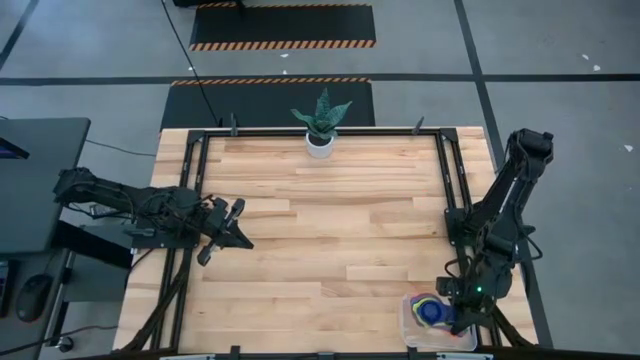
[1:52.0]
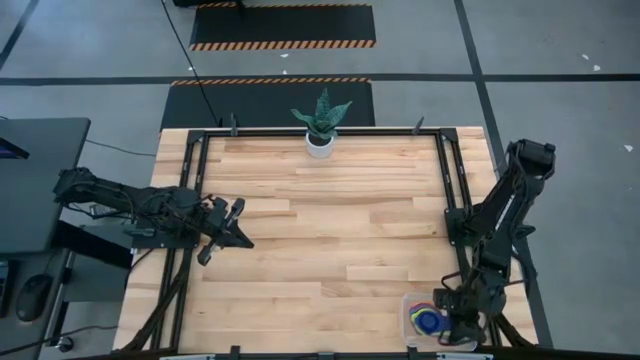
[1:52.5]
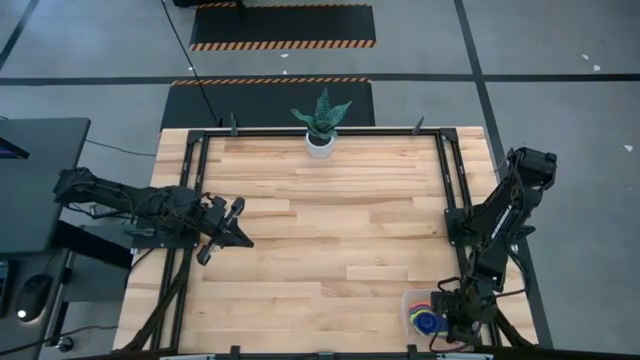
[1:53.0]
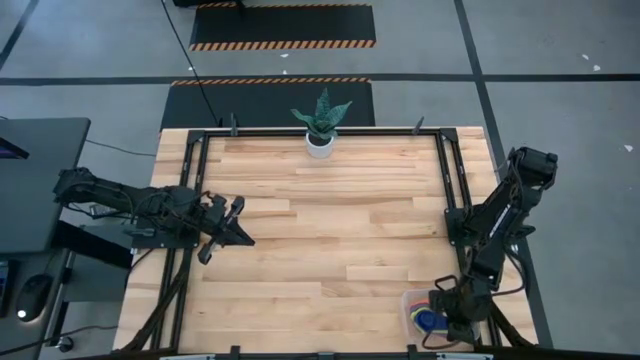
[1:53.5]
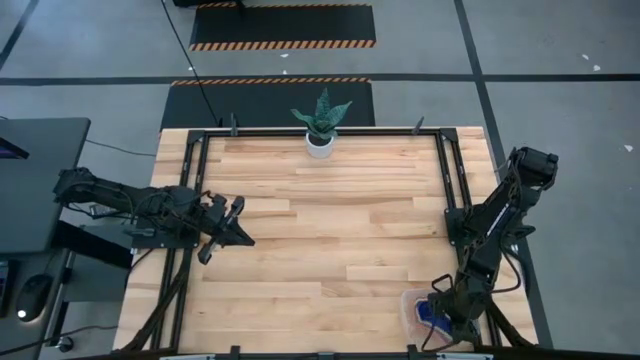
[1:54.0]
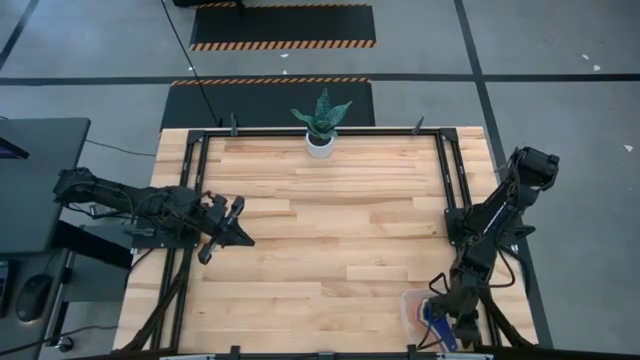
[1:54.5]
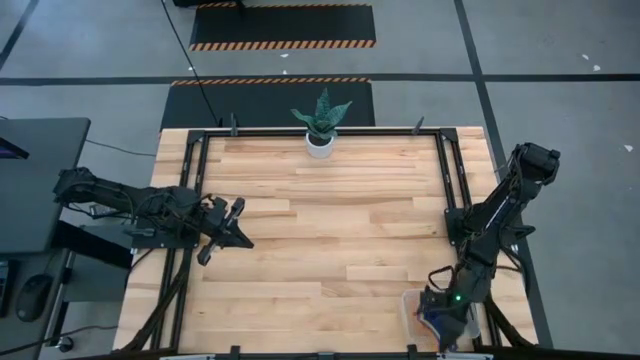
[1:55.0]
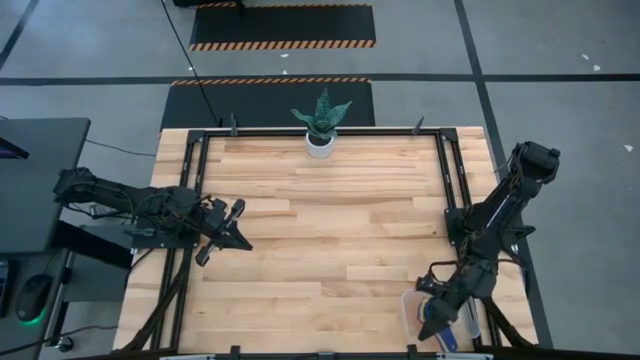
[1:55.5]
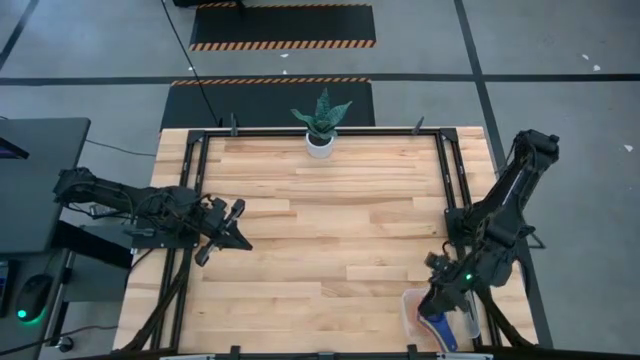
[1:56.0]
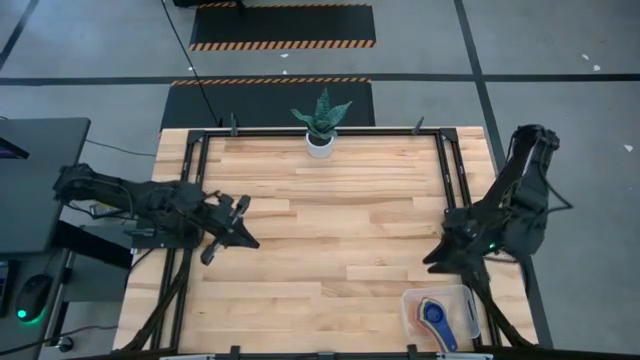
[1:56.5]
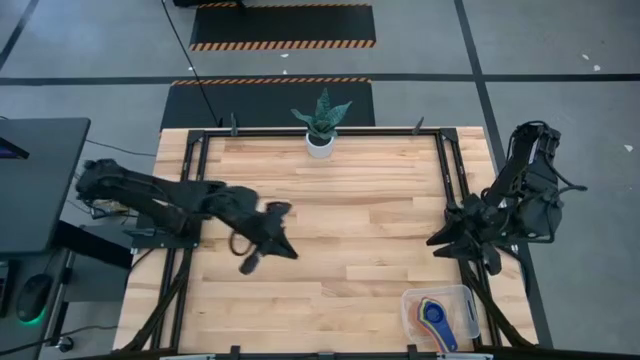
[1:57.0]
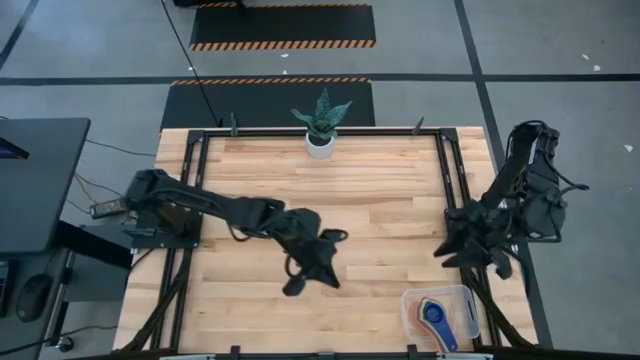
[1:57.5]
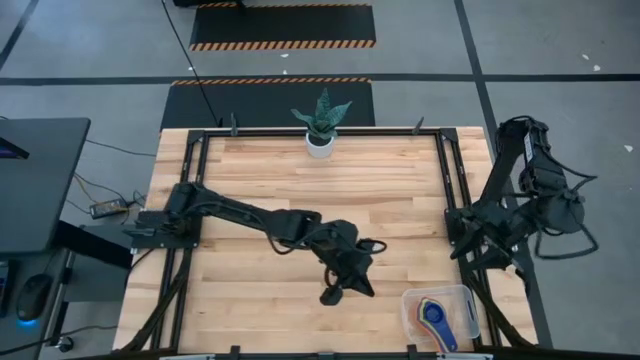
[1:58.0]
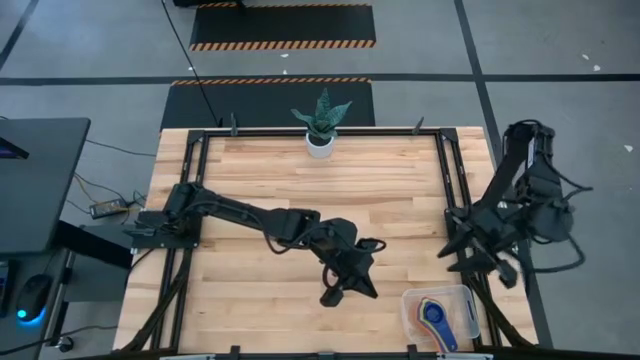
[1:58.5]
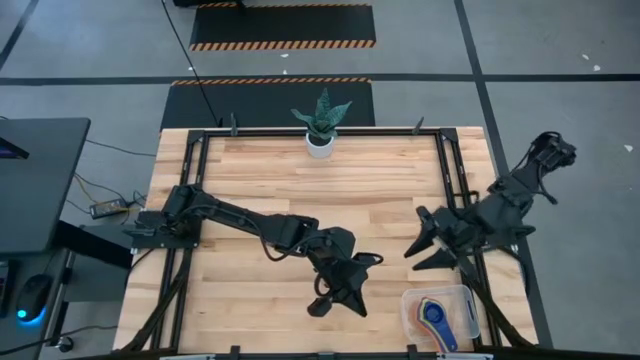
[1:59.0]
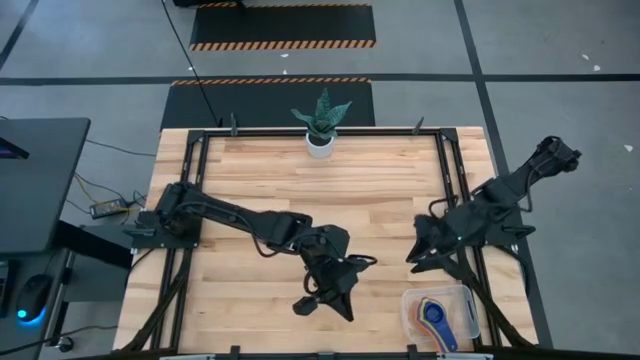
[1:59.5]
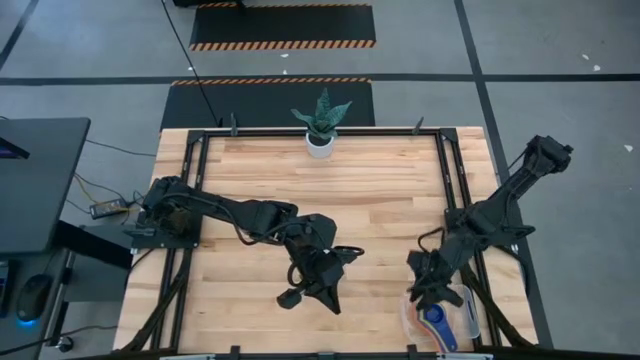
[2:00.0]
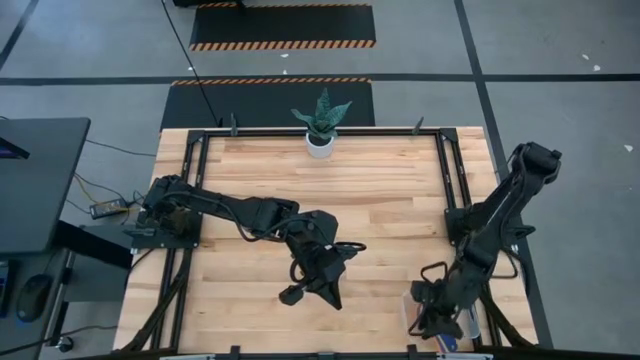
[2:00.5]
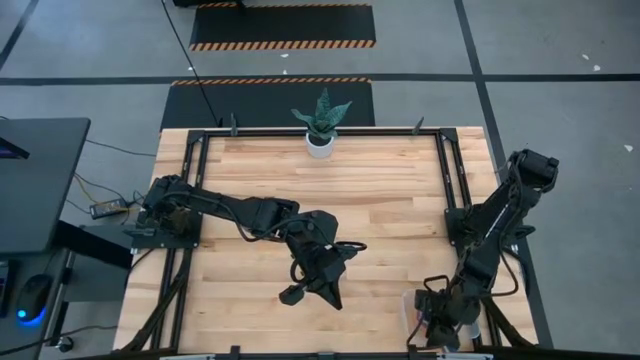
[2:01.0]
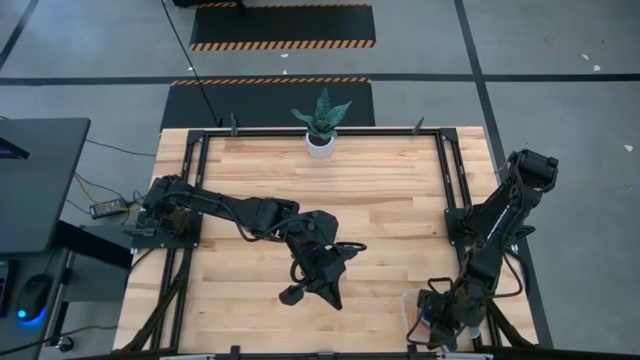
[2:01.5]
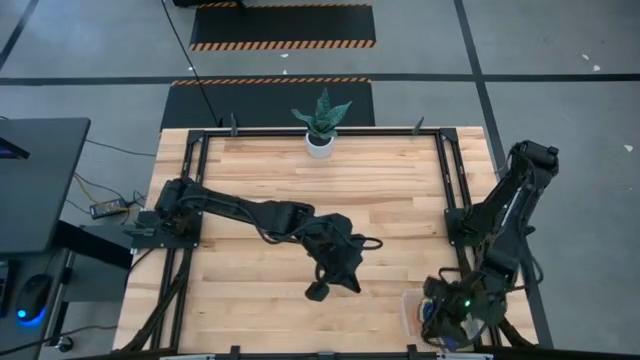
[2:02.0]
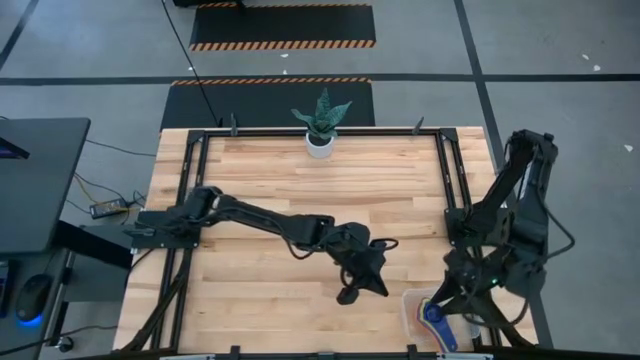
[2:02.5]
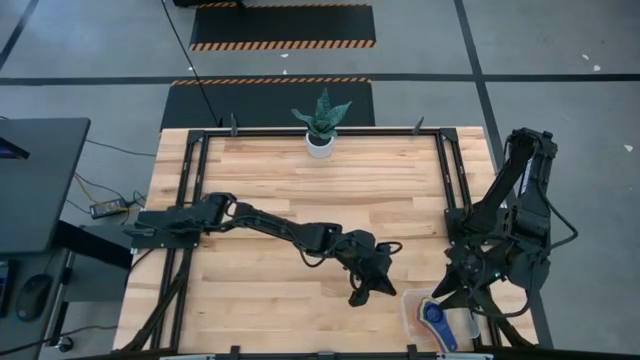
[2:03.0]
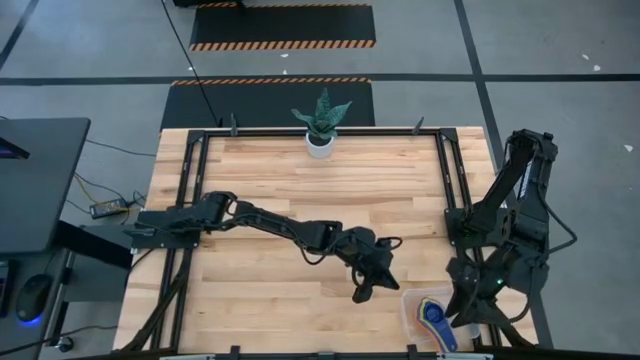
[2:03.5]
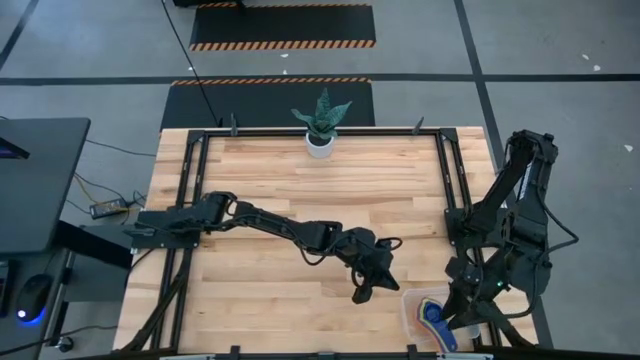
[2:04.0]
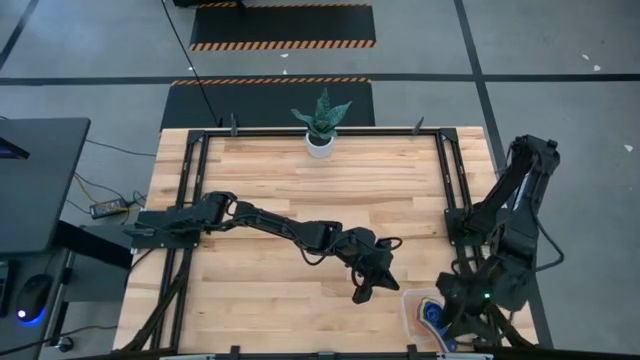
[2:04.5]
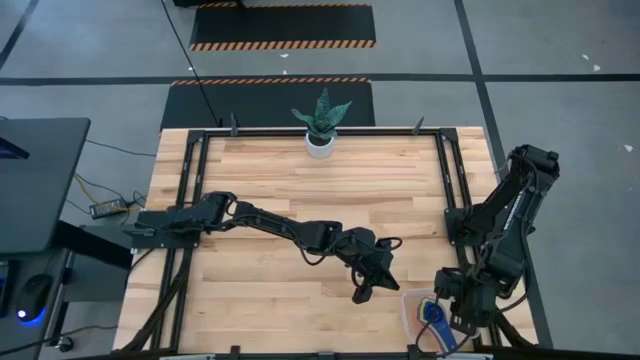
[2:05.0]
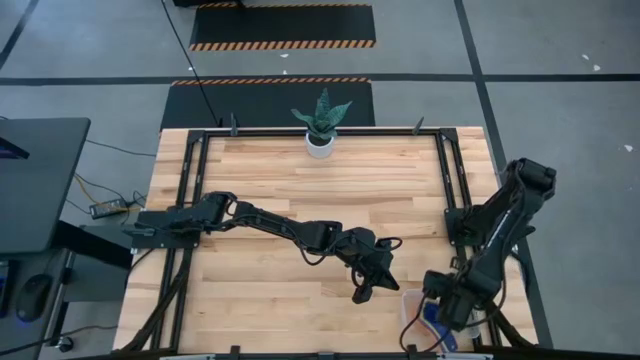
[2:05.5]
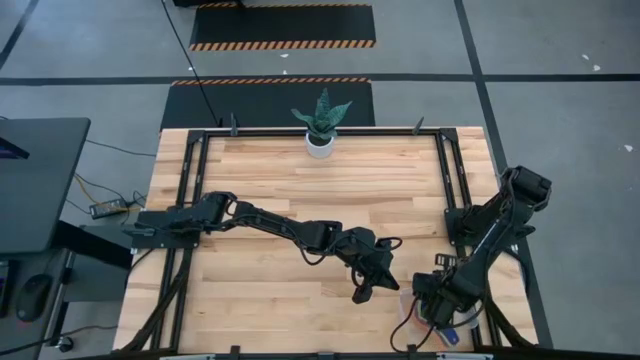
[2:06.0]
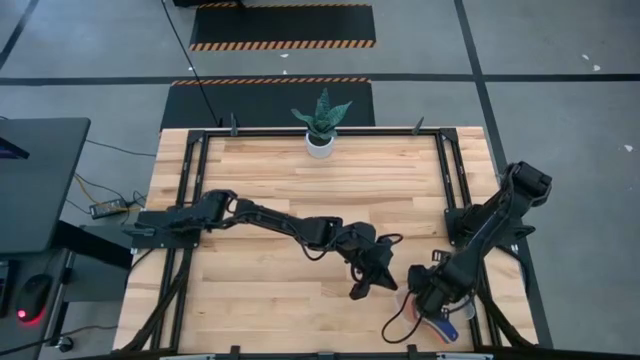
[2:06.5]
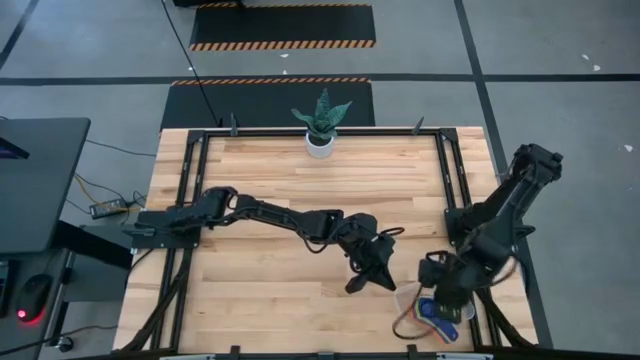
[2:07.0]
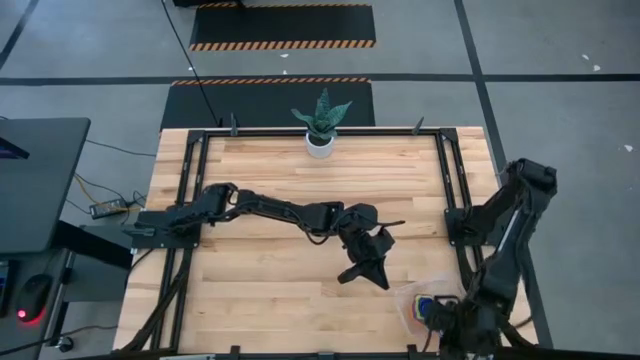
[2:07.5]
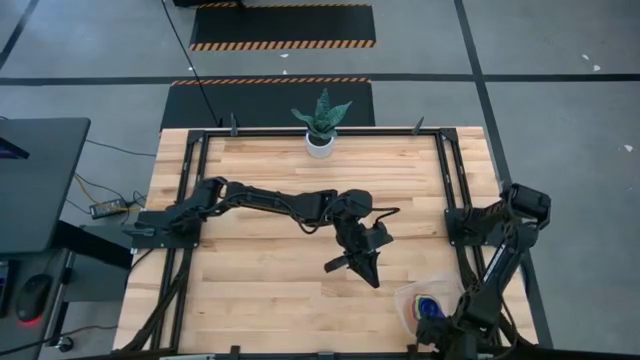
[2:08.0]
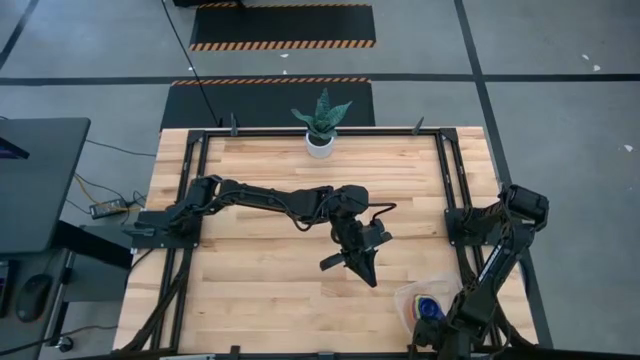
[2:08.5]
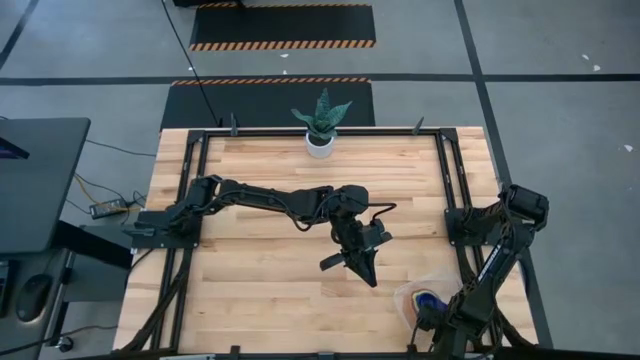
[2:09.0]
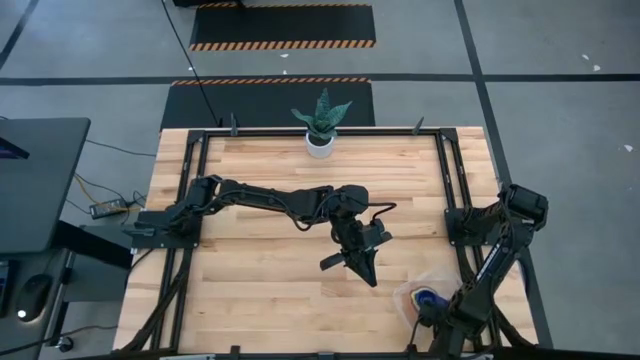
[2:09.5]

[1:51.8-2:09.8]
Task: Nest measuring cups in basket
Put the nested measuring cups into the transparent bin

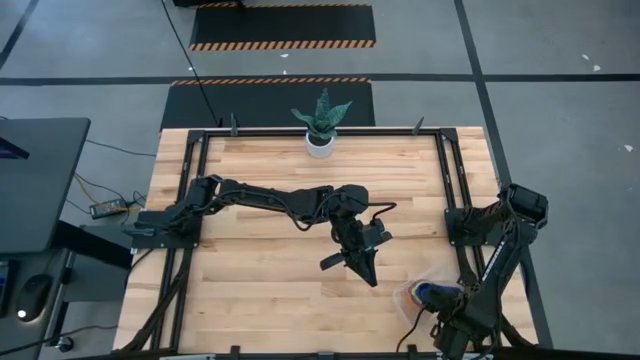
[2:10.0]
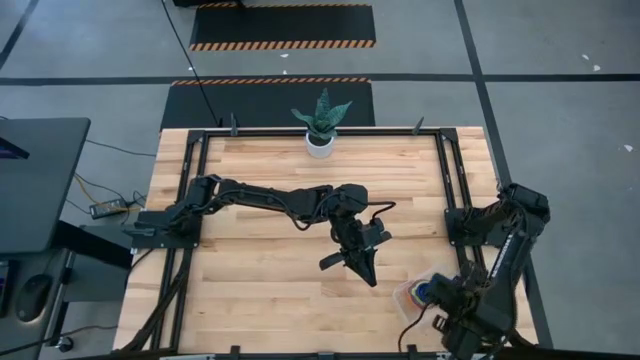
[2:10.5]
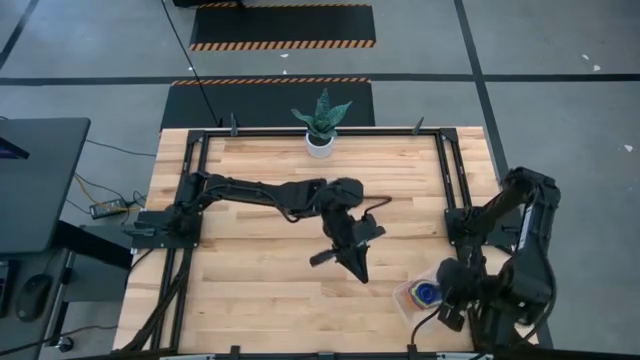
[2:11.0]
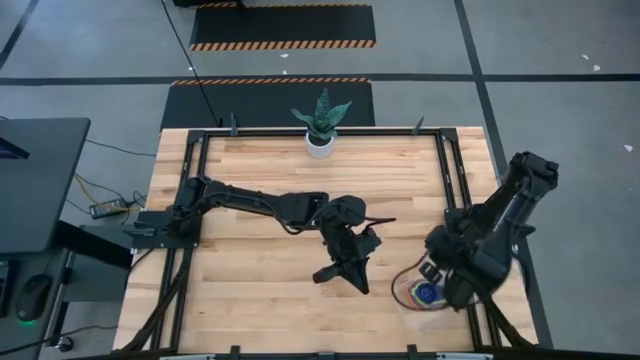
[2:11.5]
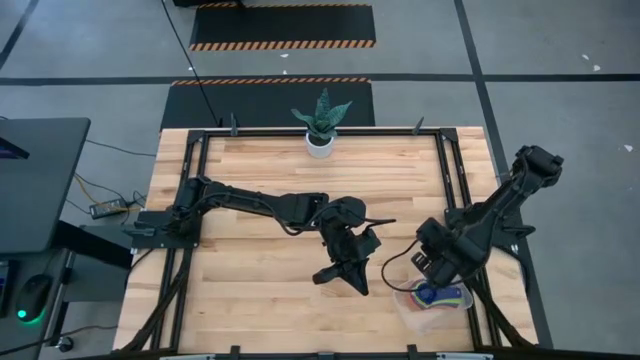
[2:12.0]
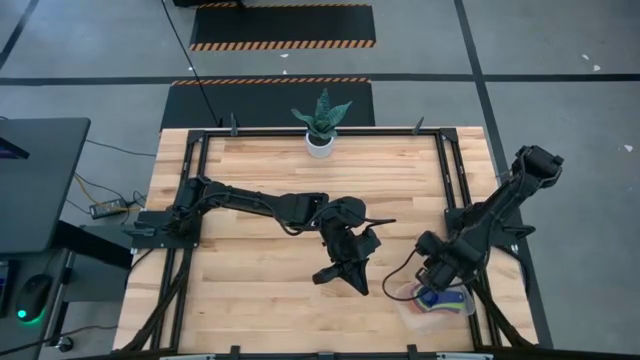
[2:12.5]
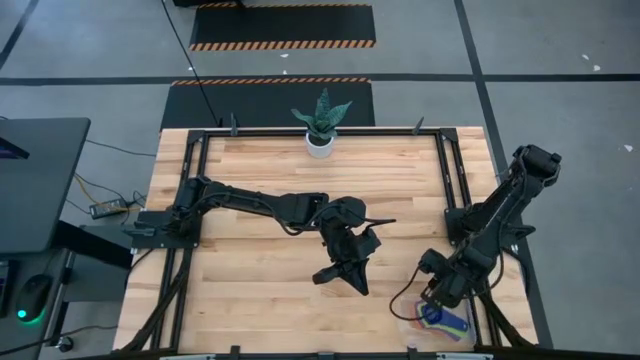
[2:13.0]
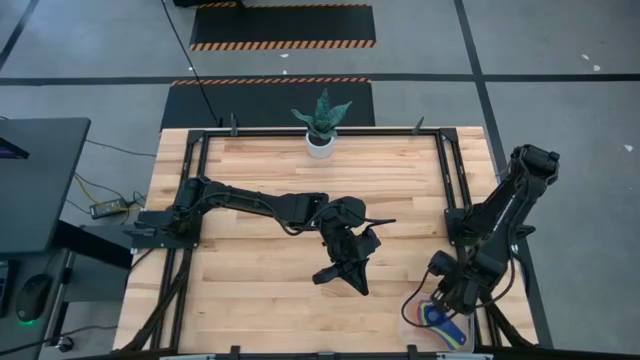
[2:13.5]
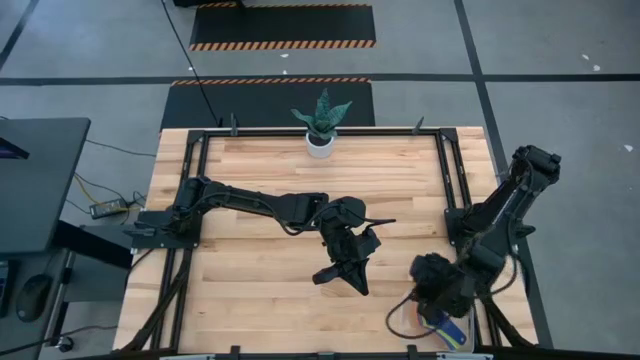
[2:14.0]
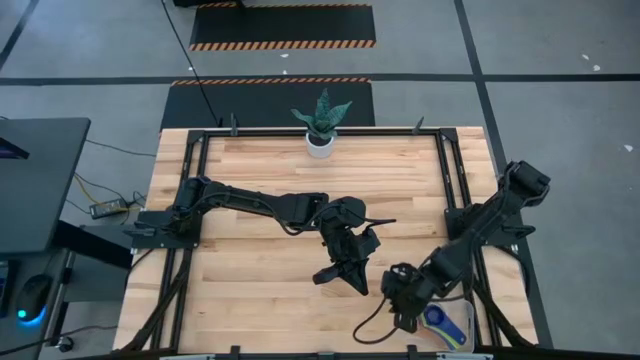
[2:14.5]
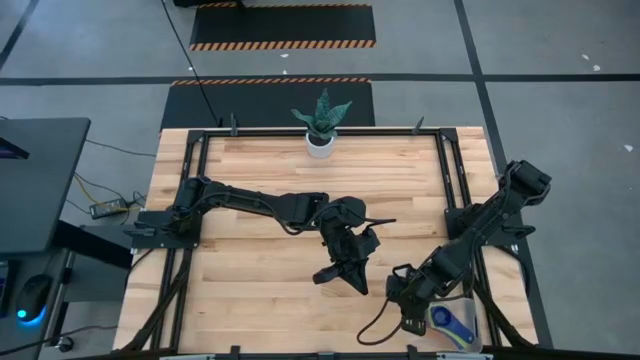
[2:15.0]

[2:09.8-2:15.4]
Adjust the transparent bin
